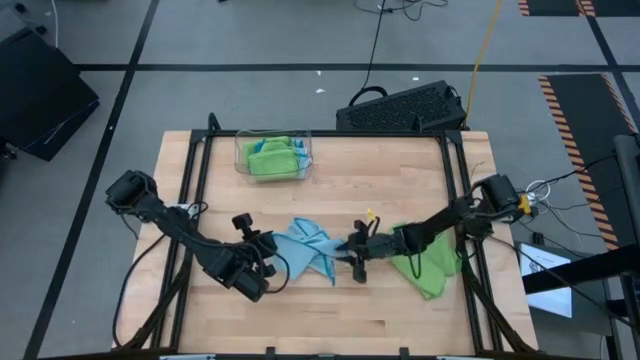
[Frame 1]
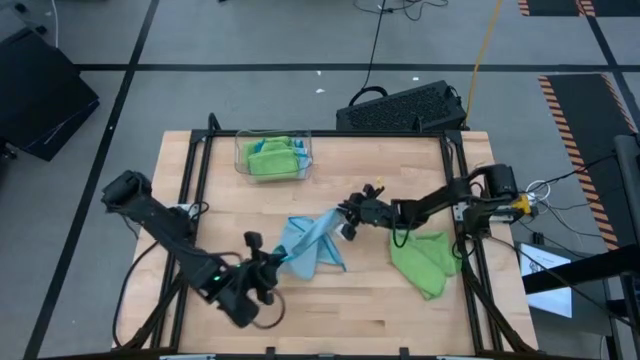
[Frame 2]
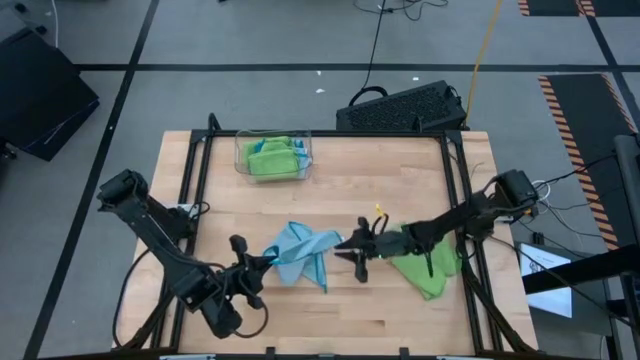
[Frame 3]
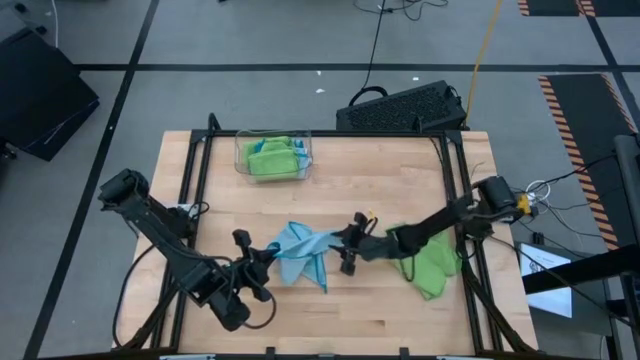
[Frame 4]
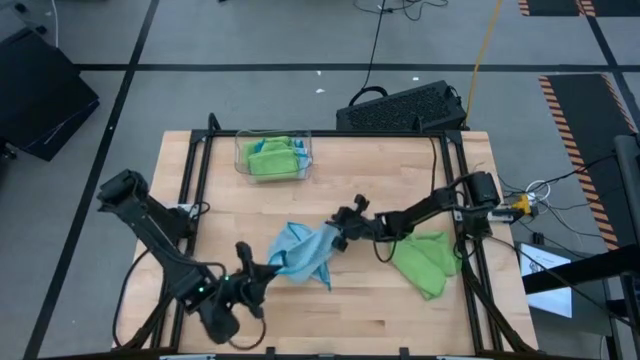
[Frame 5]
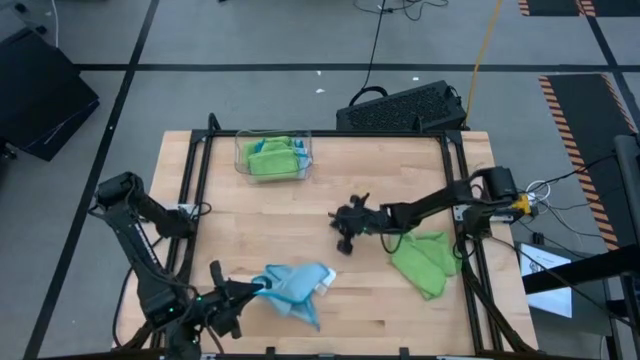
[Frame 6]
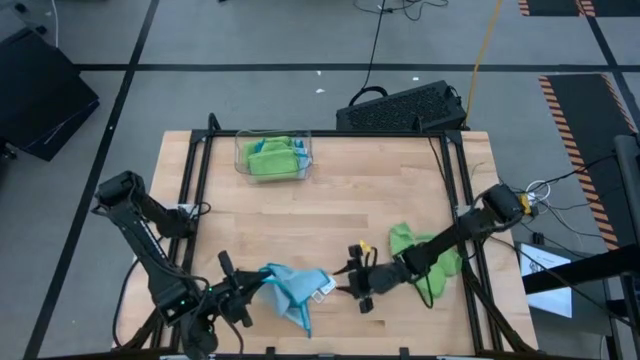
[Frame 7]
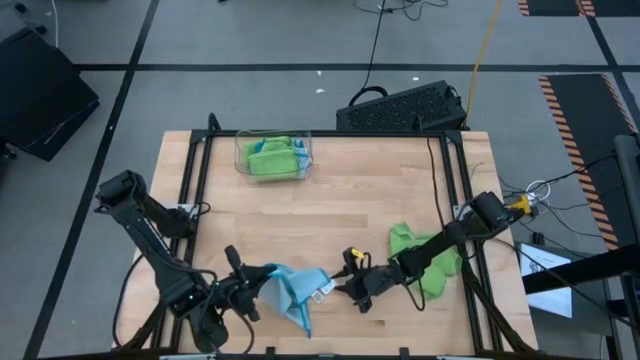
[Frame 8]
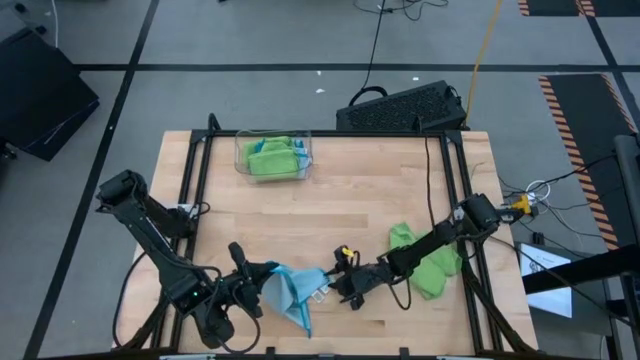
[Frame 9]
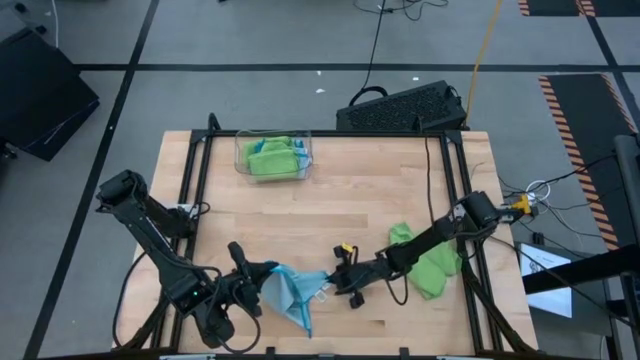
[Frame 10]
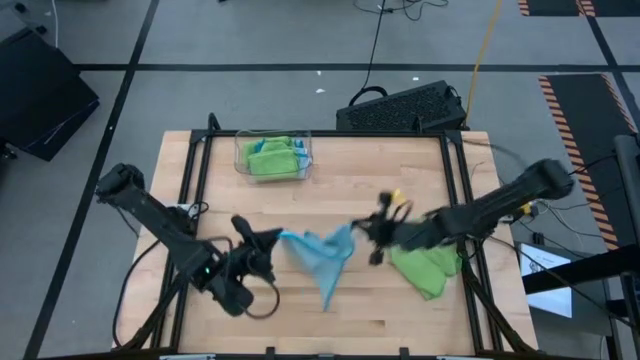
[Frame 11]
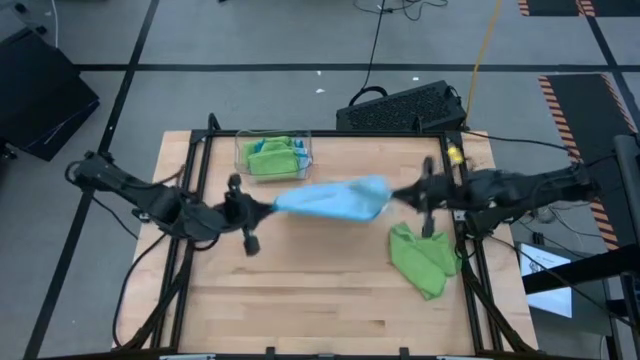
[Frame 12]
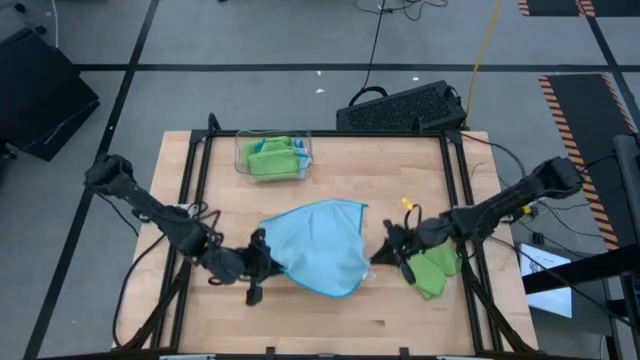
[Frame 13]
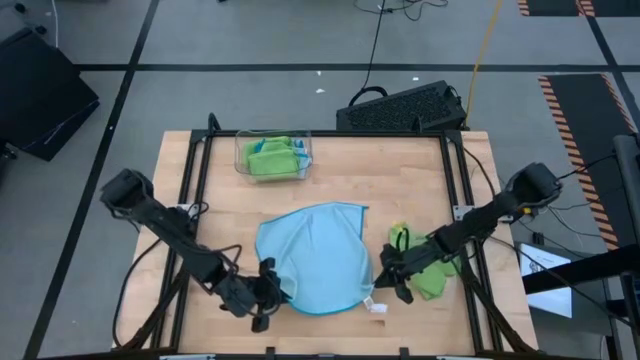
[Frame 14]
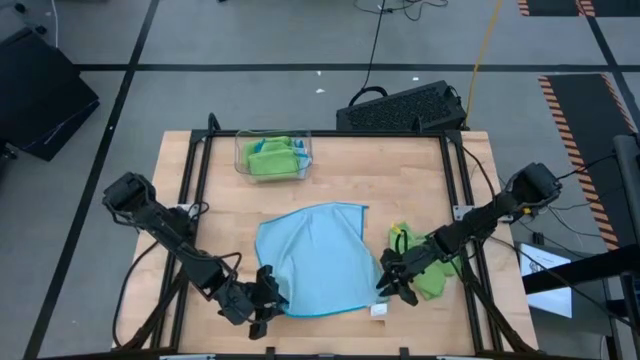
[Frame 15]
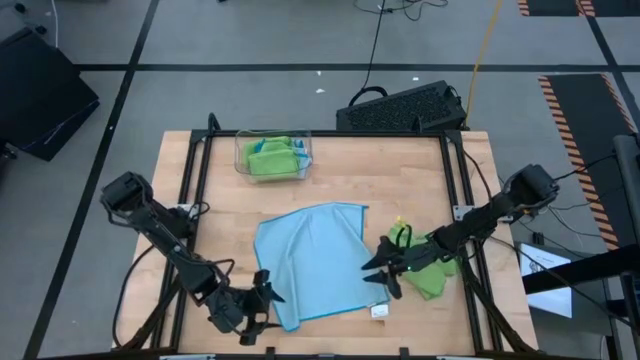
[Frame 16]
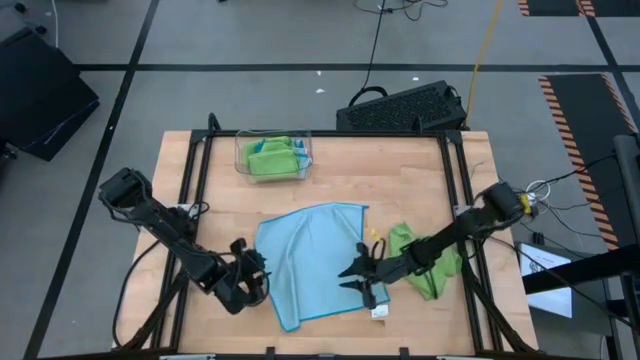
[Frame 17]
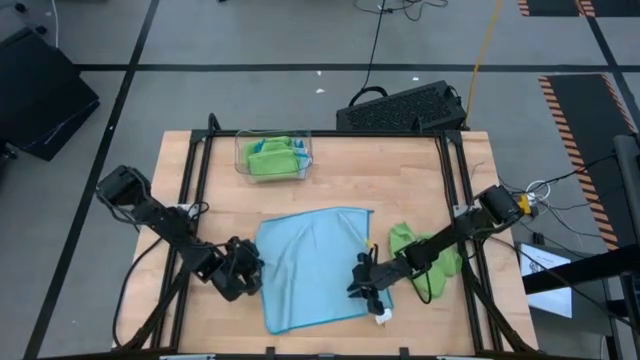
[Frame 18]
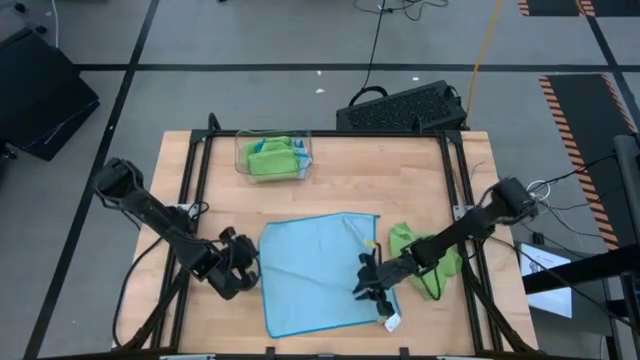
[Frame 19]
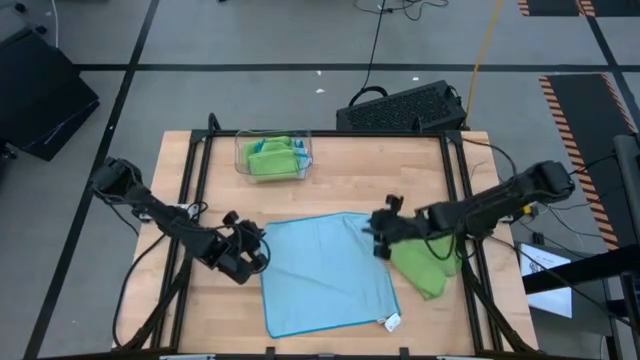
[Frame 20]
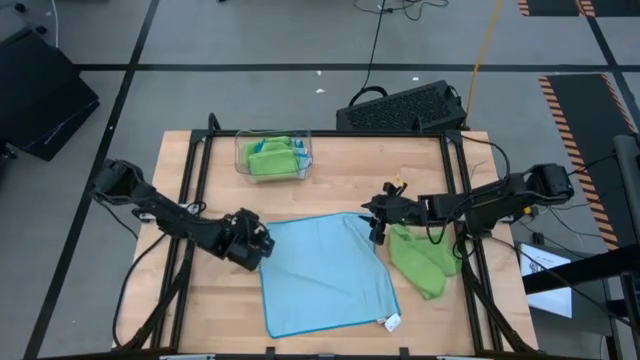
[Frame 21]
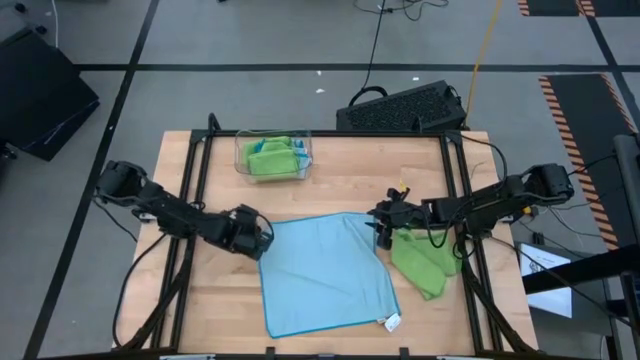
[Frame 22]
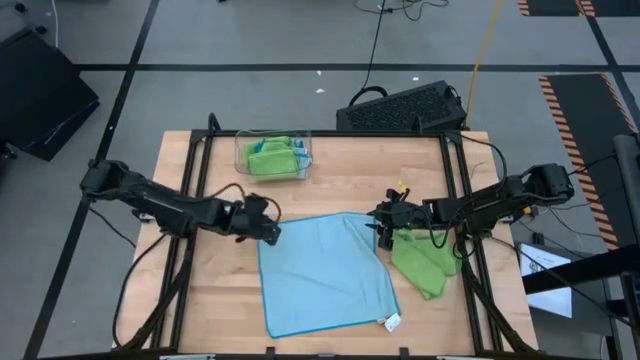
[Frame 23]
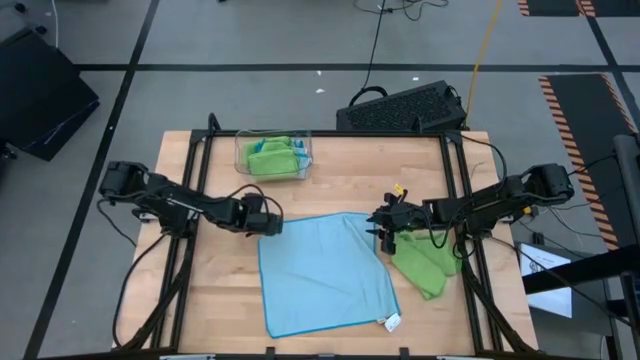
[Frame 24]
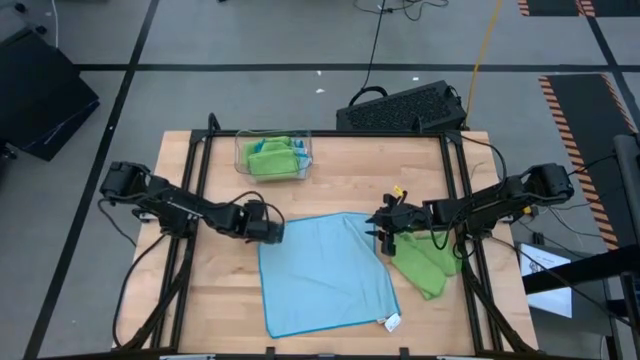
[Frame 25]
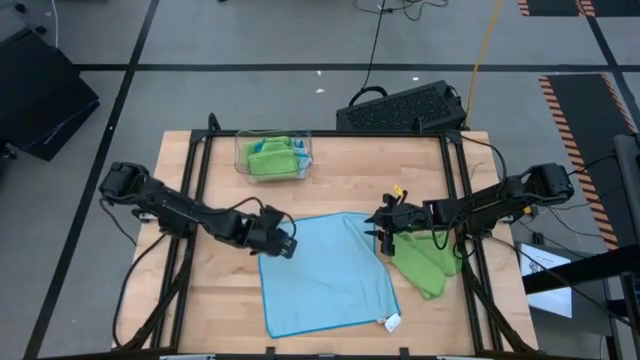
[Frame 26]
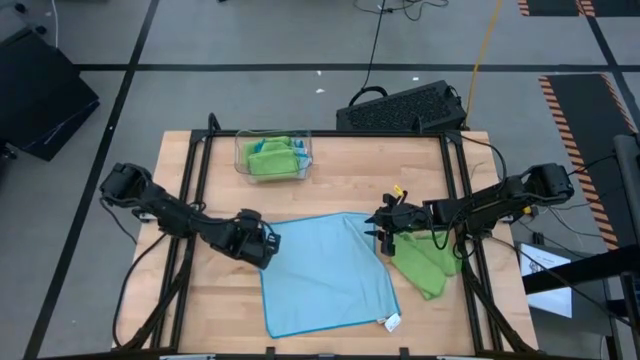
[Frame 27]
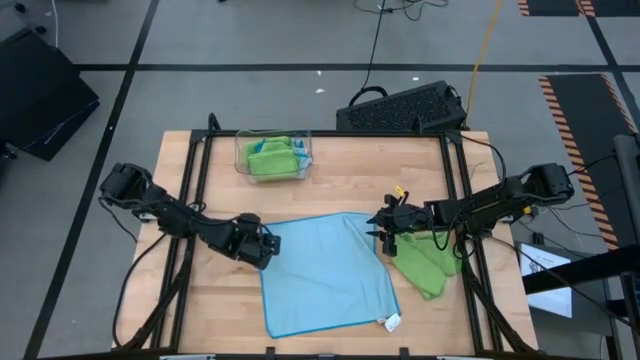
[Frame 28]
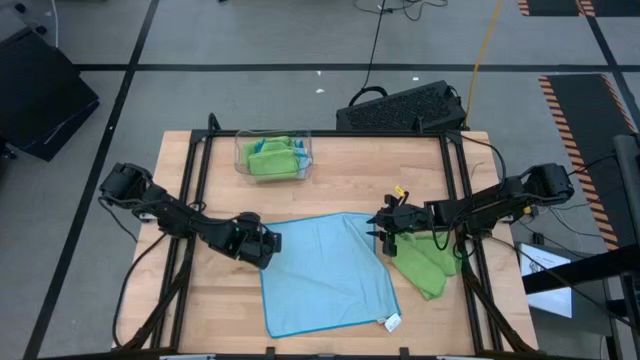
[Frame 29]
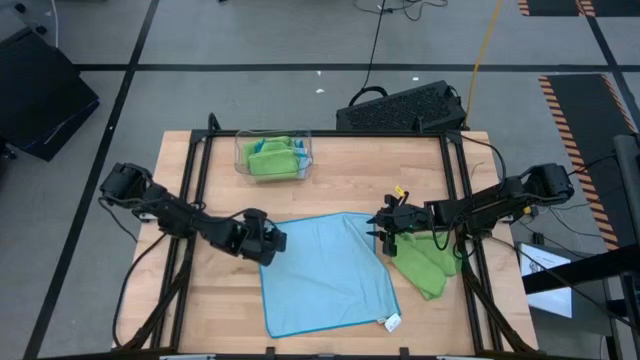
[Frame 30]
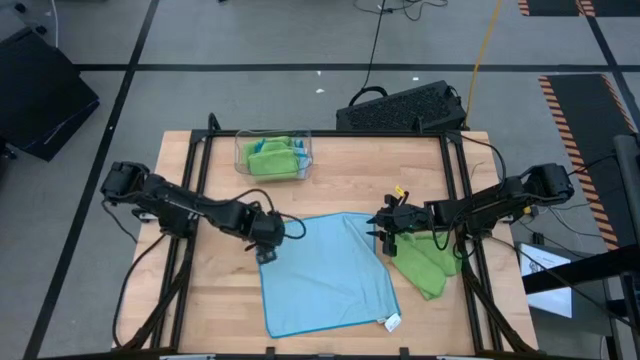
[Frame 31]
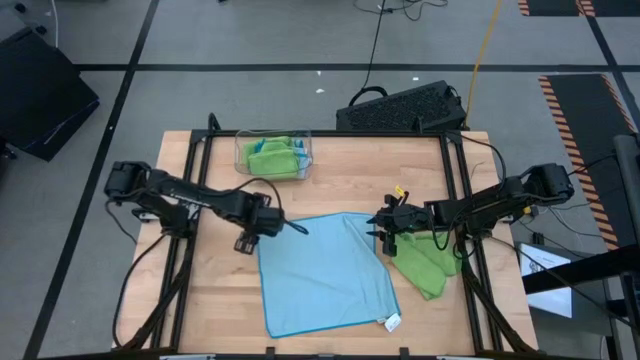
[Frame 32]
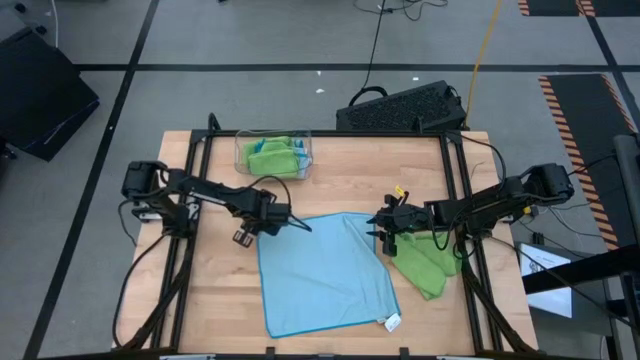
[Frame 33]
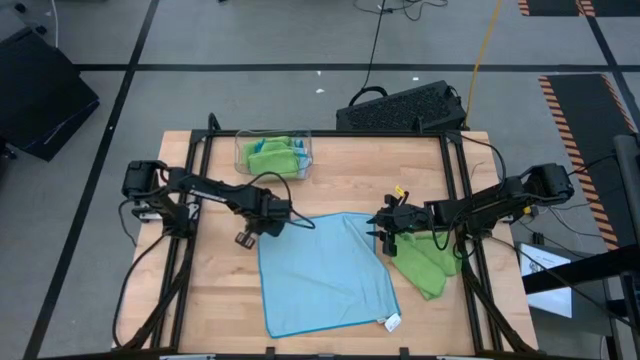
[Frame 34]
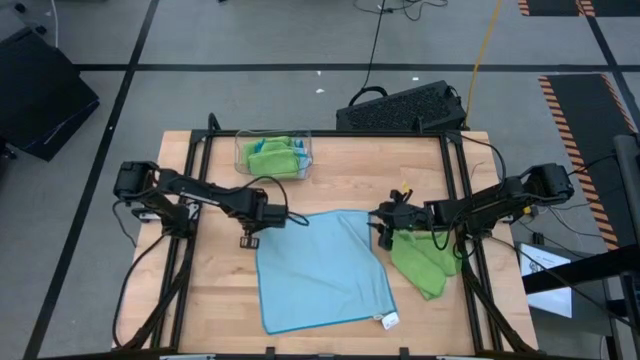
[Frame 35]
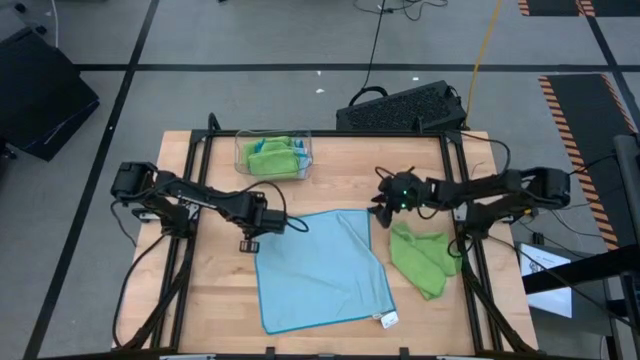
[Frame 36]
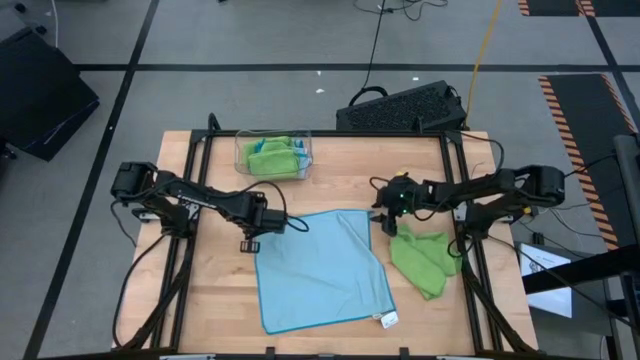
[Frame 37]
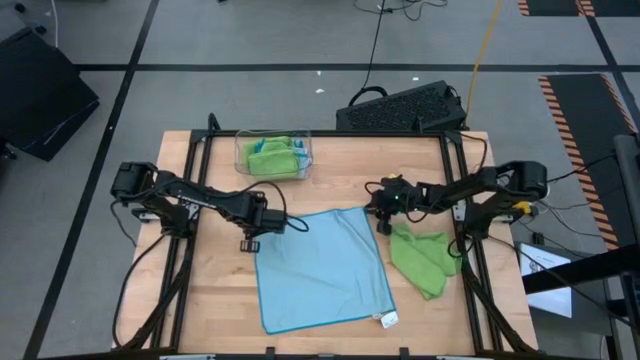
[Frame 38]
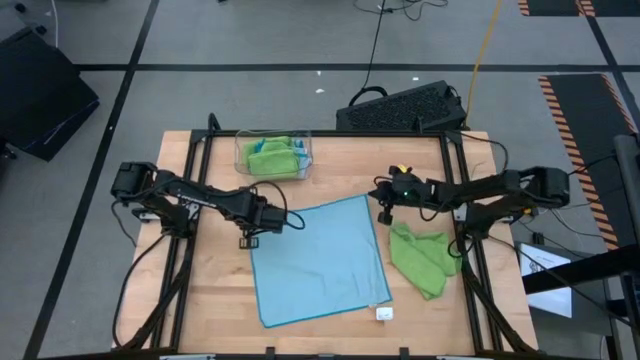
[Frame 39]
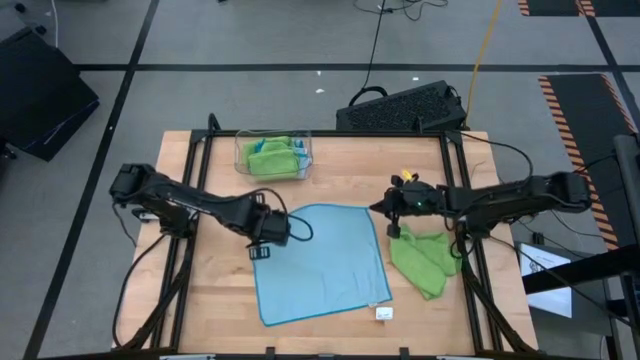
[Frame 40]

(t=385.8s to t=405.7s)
Task: Fold microfiber towels
Fold the blue microfiber cloth
